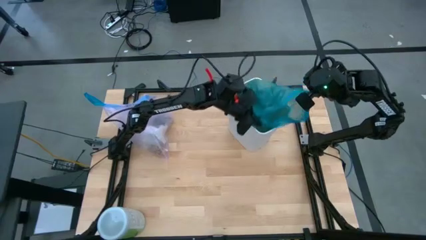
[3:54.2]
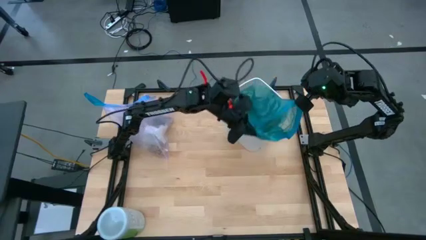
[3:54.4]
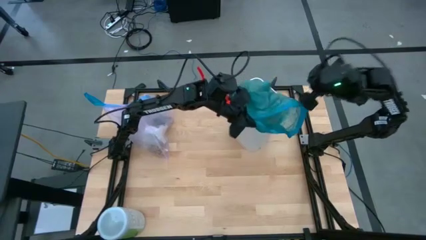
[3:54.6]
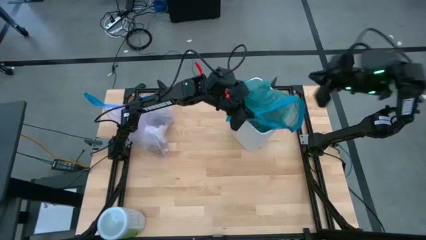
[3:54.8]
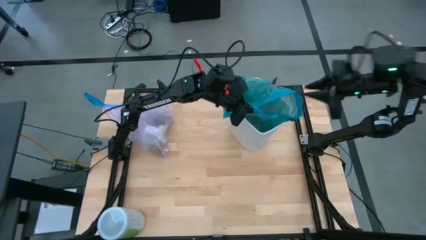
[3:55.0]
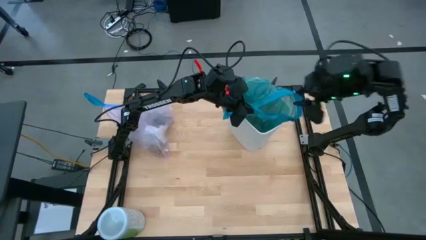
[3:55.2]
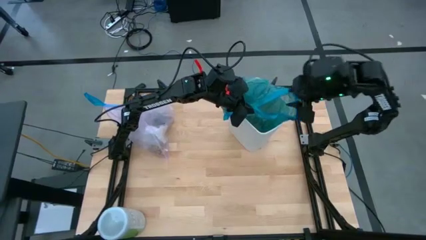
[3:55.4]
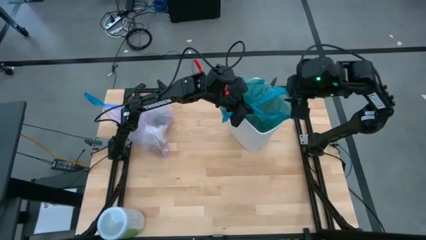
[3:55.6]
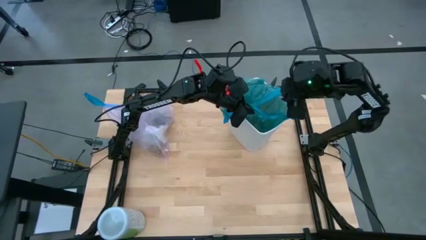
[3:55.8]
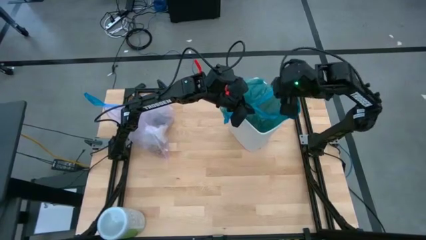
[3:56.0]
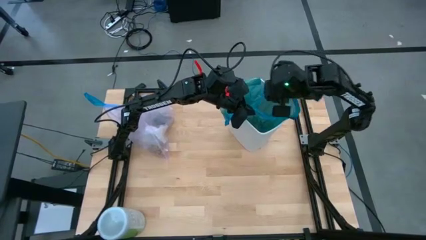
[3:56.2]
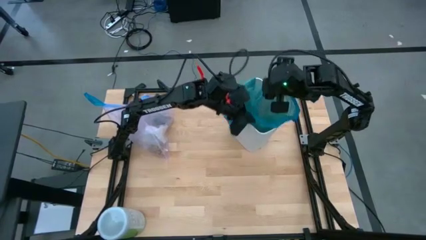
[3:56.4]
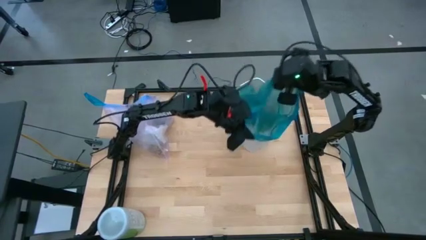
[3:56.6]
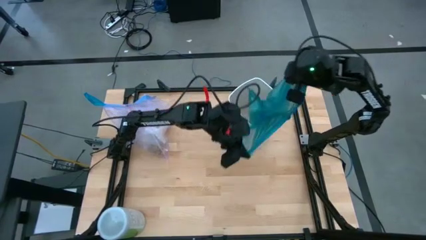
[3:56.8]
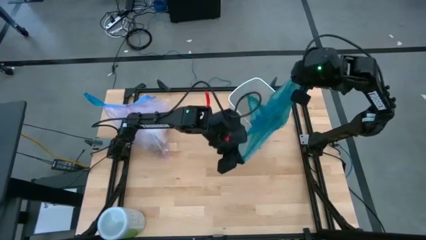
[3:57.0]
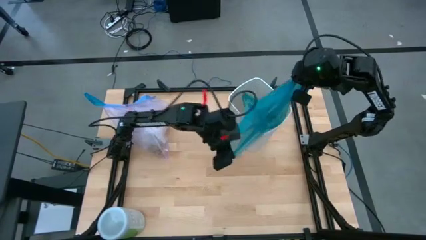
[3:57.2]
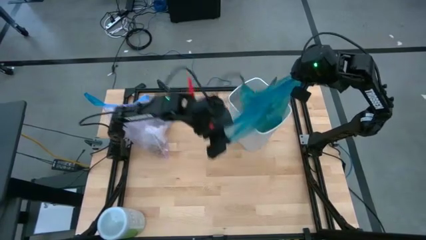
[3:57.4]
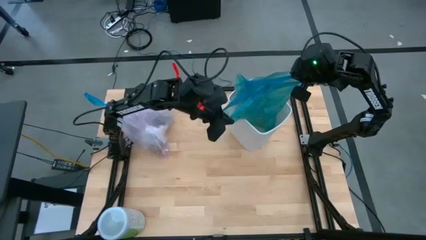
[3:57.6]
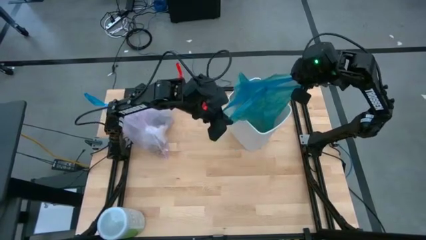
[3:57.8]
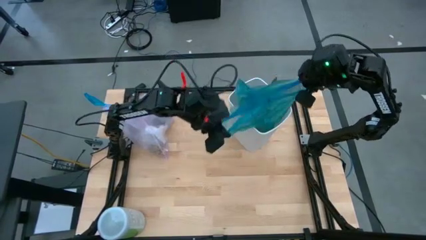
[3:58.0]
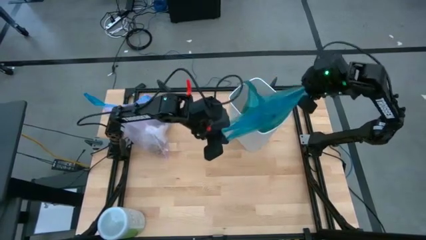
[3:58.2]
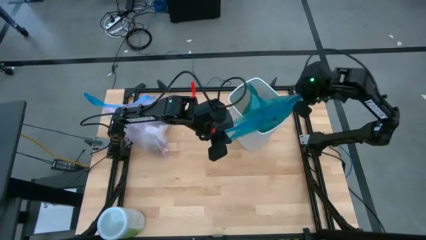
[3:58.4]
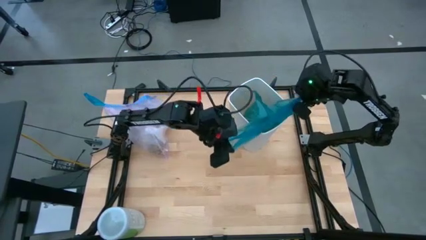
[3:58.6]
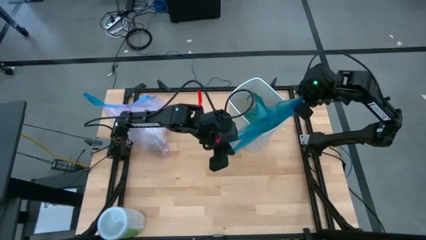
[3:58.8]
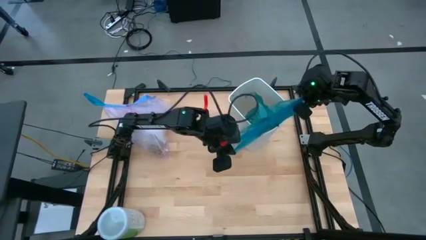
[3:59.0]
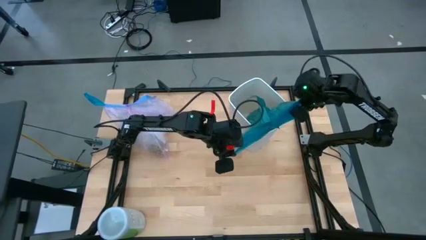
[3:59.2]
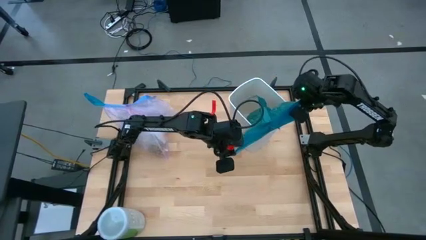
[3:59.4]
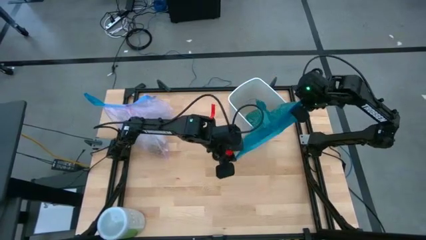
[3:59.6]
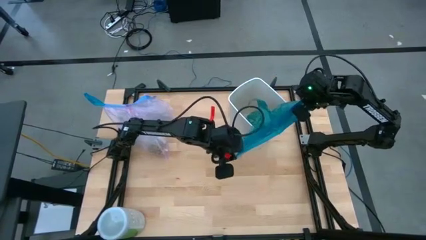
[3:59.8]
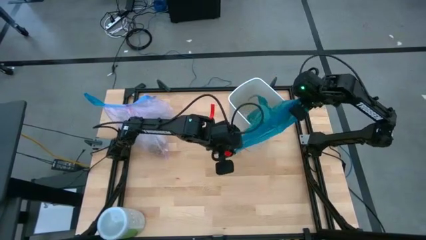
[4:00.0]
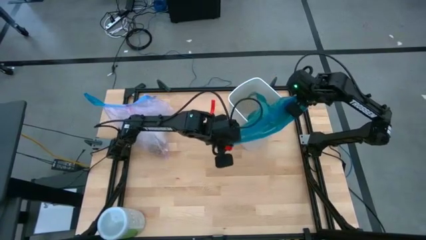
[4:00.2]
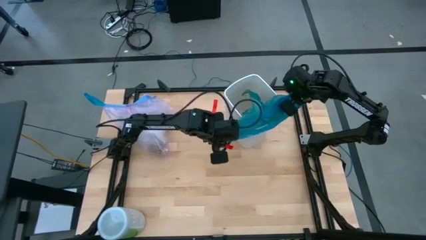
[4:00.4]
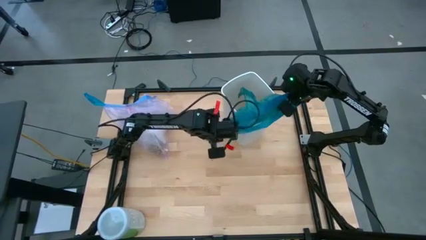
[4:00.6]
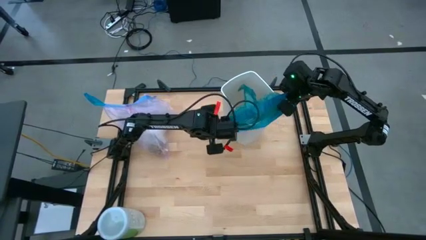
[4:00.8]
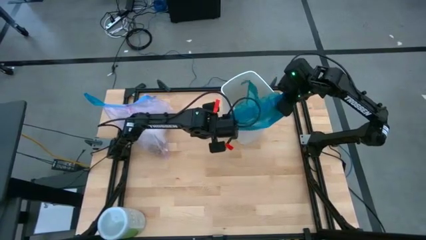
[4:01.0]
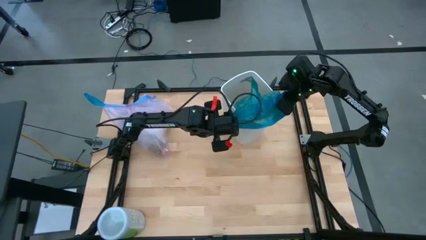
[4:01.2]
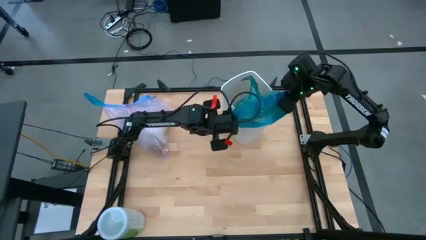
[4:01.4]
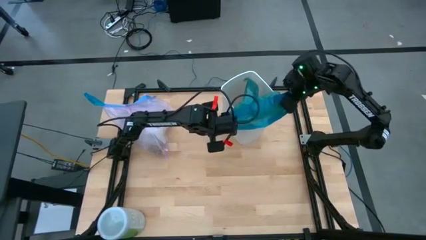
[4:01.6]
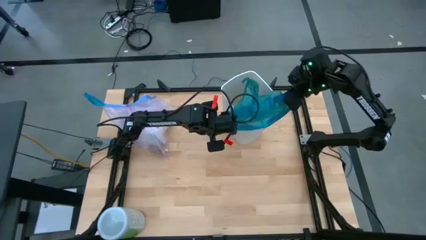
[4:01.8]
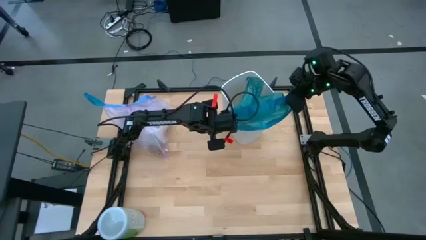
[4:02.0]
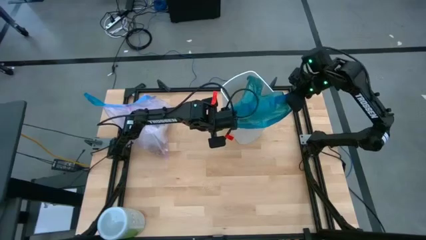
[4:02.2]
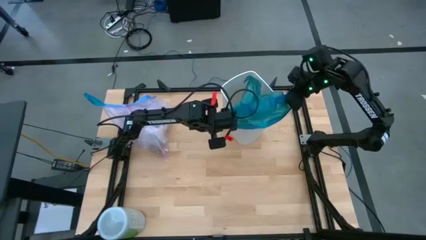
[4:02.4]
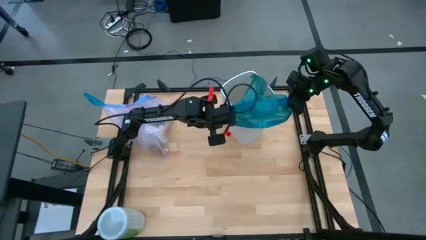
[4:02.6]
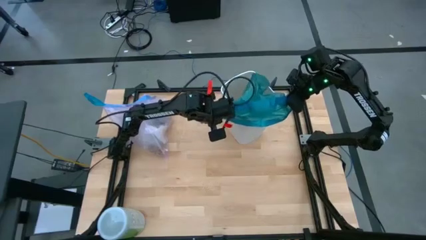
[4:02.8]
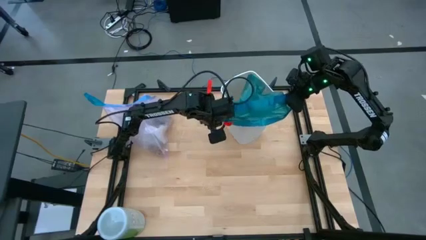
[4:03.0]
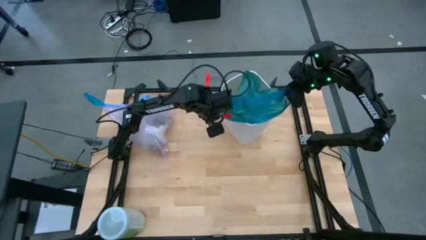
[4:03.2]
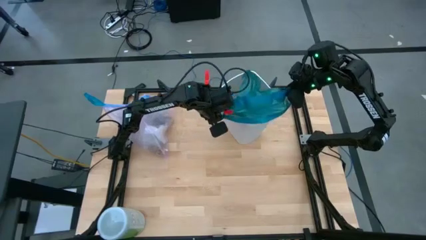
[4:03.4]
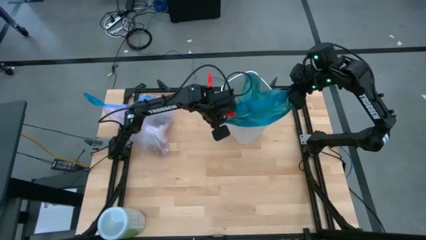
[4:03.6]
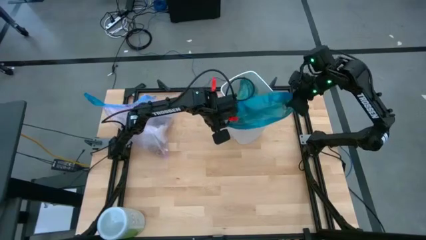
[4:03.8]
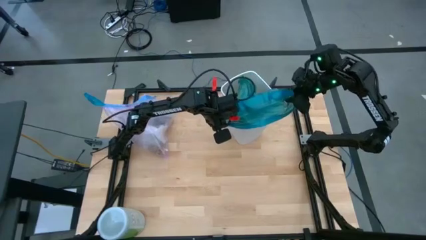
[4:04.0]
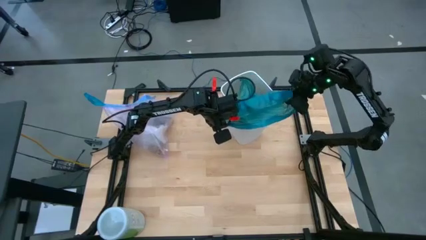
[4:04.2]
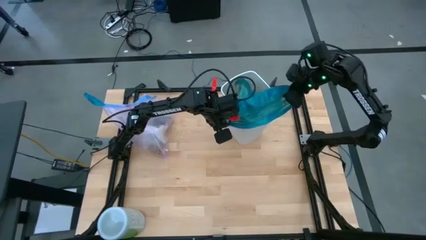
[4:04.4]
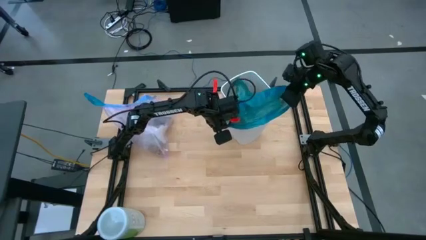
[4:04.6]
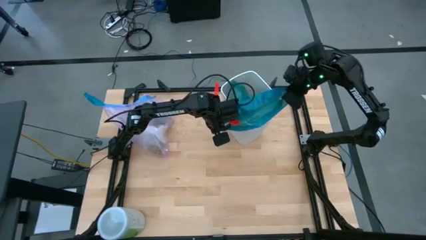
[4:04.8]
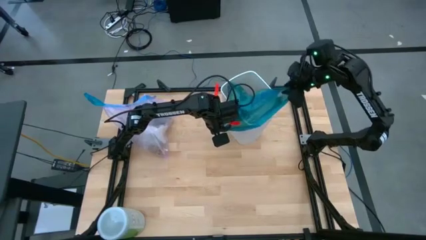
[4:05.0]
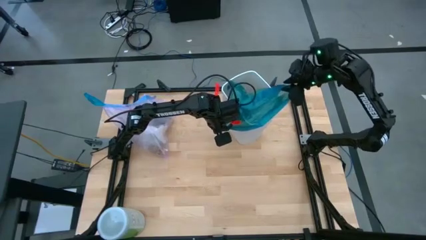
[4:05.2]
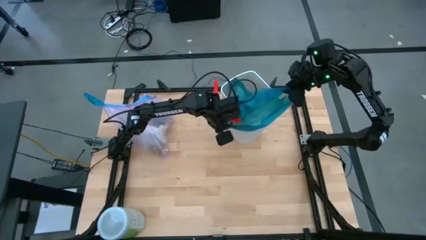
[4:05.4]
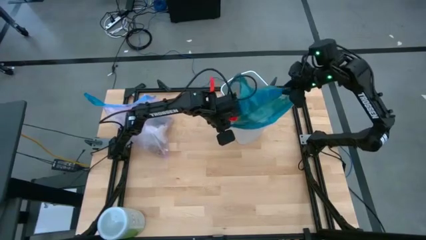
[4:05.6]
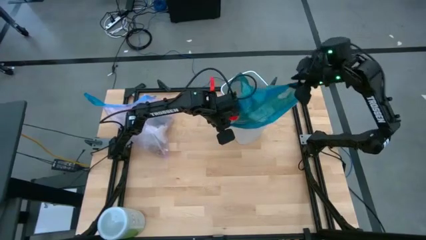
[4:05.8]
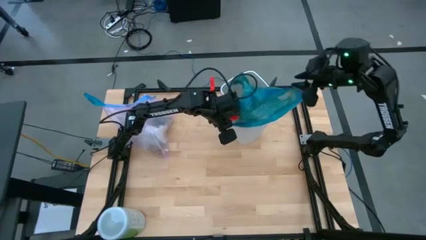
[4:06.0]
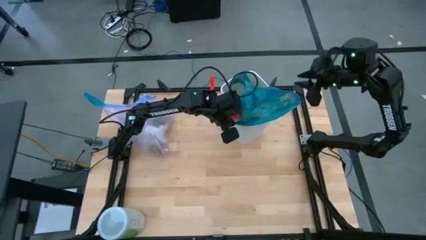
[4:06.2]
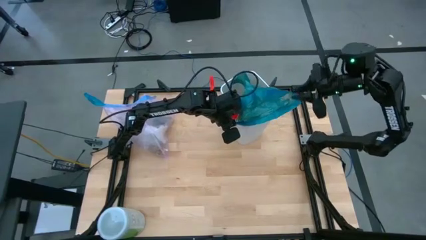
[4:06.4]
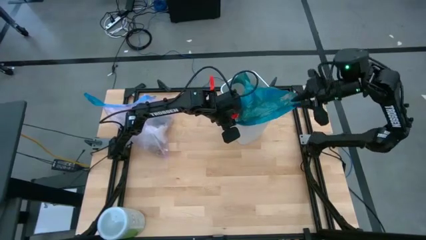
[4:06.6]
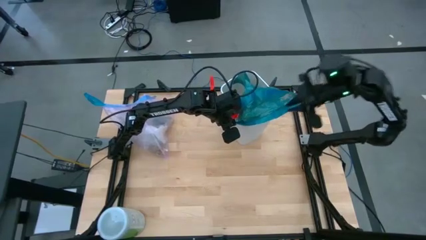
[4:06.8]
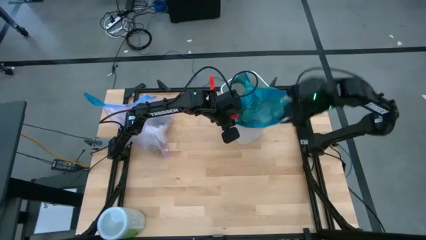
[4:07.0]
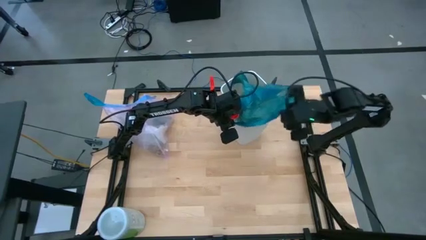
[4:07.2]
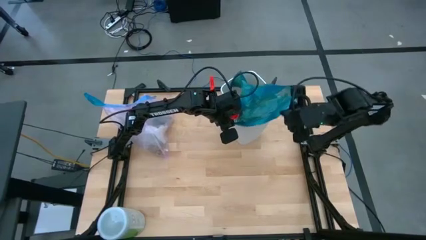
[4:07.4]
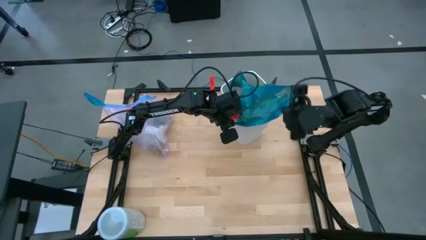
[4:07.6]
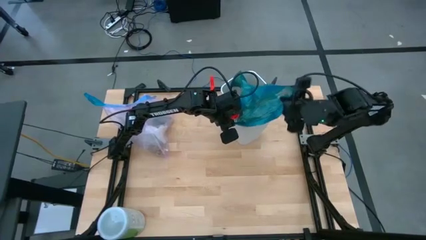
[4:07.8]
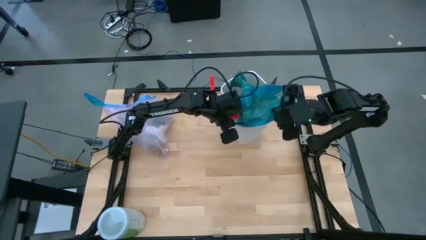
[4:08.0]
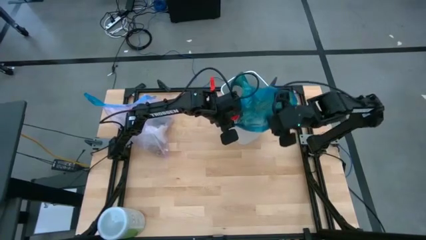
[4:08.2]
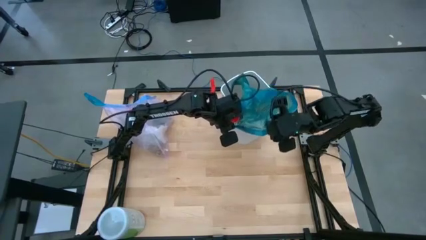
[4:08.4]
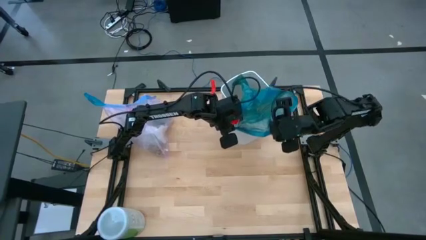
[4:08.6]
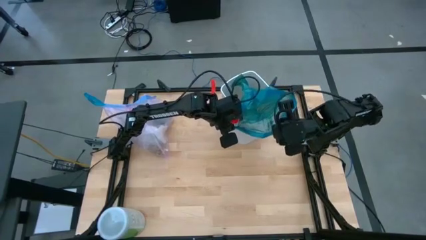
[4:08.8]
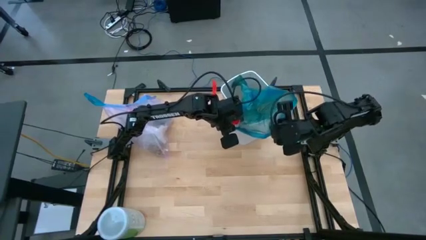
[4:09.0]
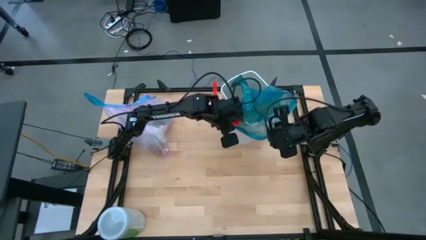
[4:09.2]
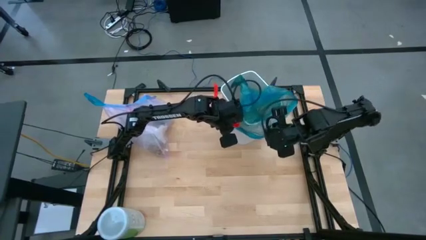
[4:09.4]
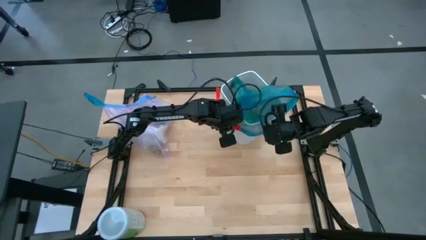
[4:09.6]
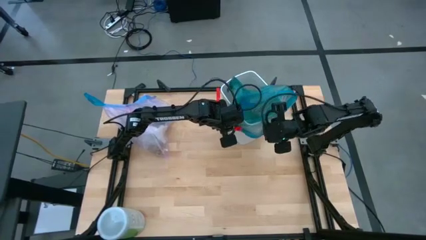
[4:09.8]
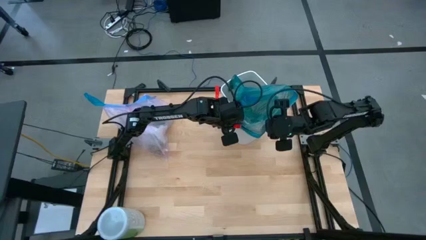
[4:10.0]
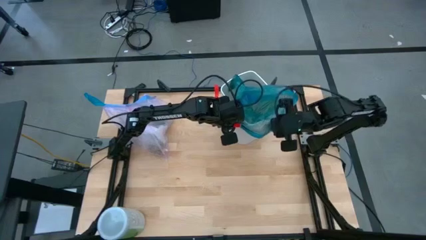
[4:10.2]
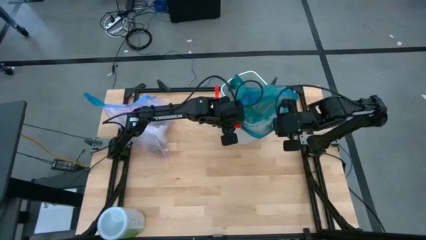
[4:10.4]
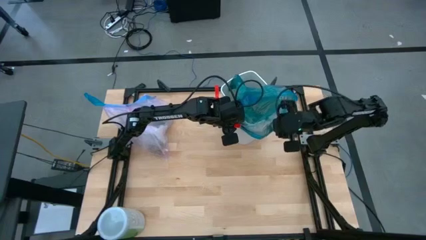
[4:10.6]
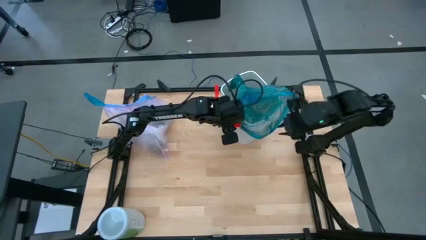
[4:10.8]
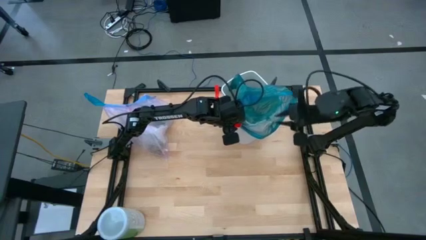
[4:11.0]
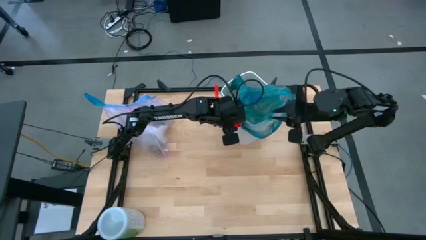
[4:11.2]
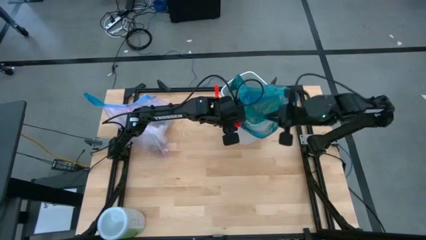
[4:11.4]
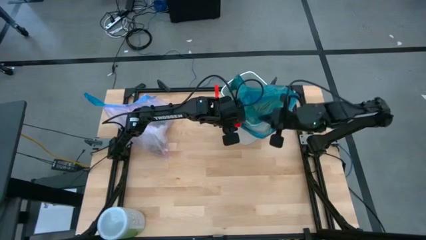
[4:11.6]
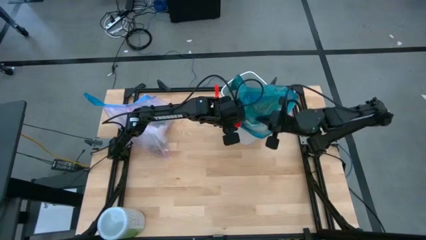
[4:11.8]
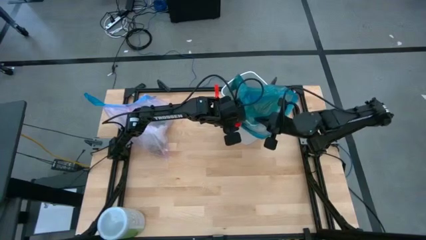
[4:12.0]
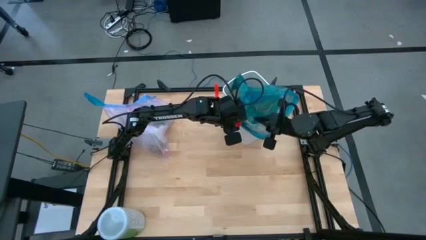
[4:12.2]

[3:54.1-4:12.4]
Task: place trash/remove bag and relplace
Put the blue trash bag into the white trash bin
